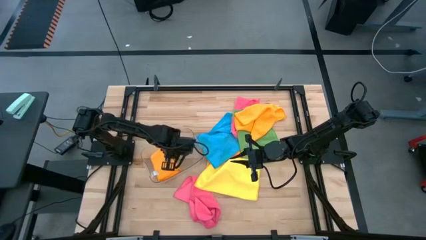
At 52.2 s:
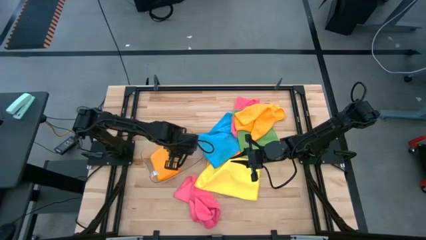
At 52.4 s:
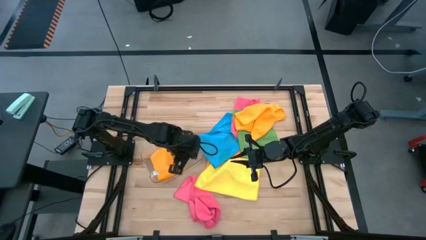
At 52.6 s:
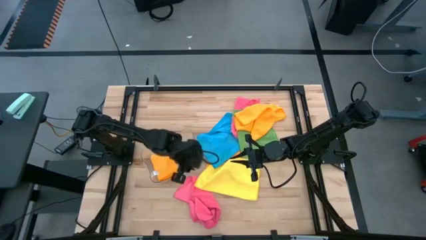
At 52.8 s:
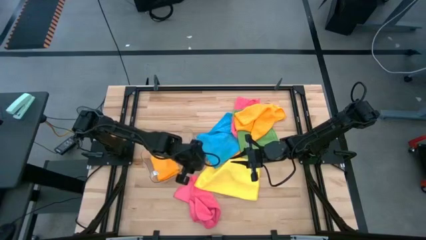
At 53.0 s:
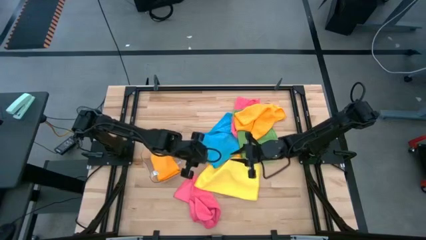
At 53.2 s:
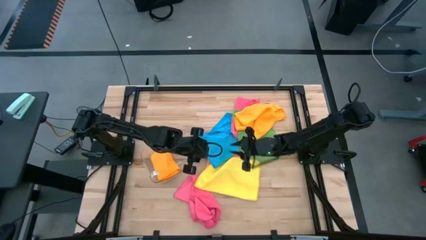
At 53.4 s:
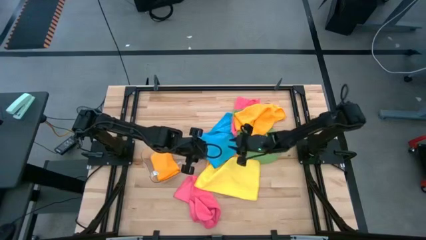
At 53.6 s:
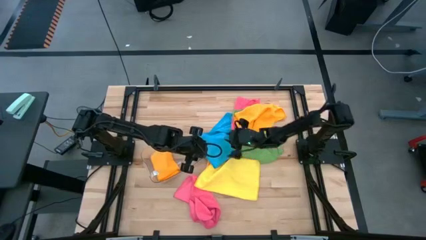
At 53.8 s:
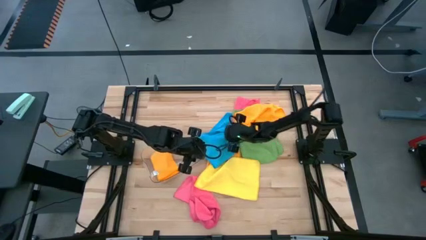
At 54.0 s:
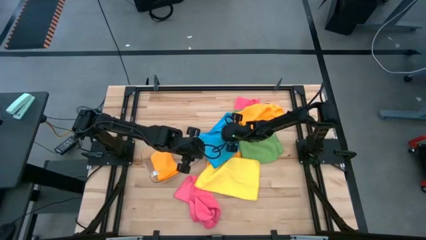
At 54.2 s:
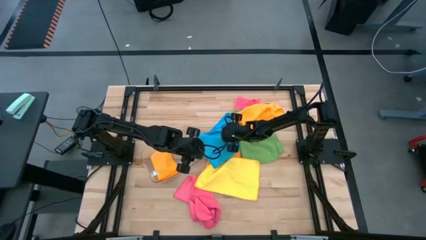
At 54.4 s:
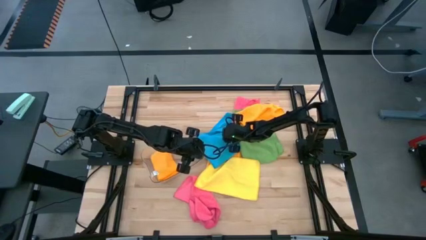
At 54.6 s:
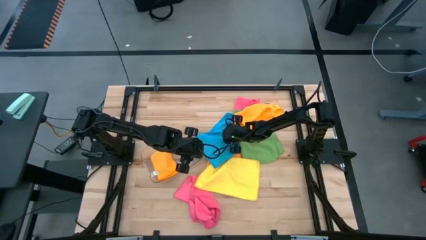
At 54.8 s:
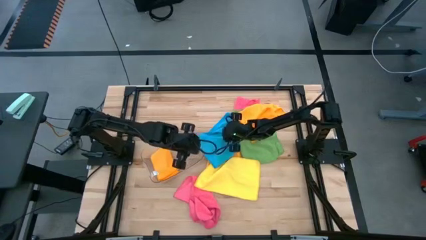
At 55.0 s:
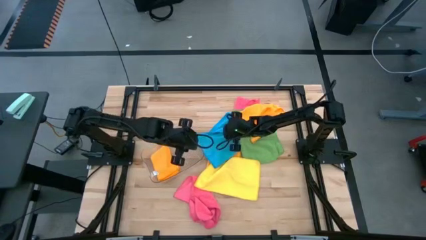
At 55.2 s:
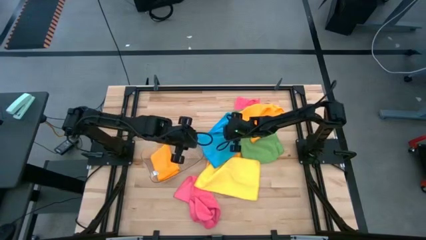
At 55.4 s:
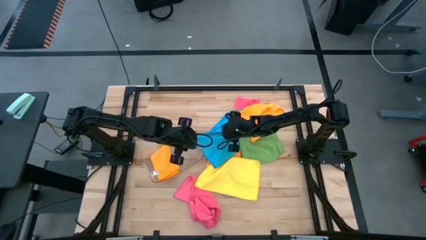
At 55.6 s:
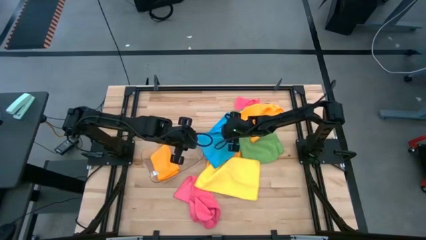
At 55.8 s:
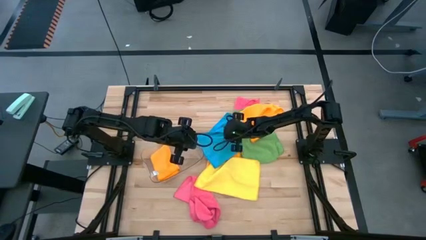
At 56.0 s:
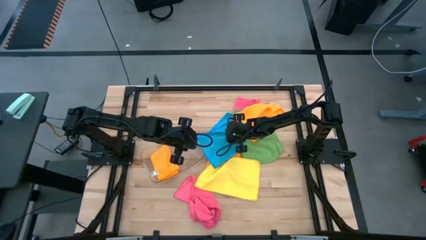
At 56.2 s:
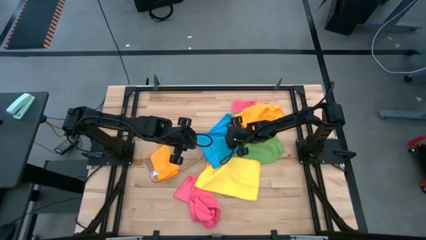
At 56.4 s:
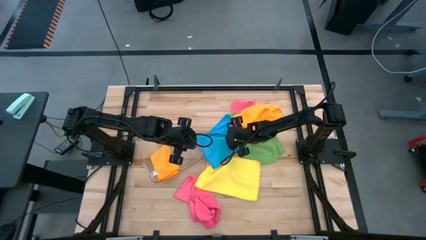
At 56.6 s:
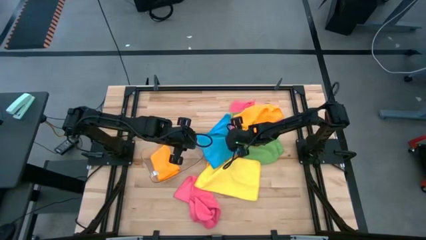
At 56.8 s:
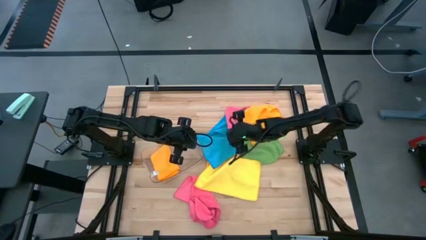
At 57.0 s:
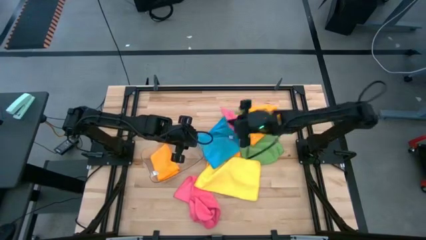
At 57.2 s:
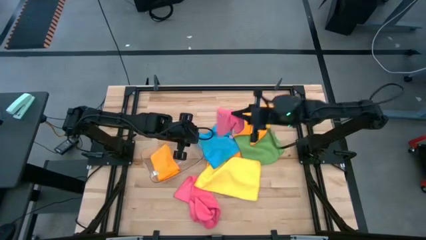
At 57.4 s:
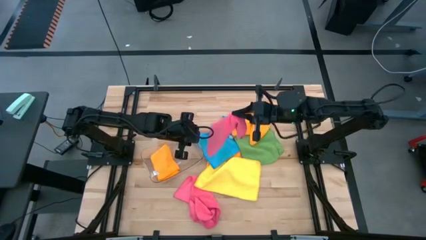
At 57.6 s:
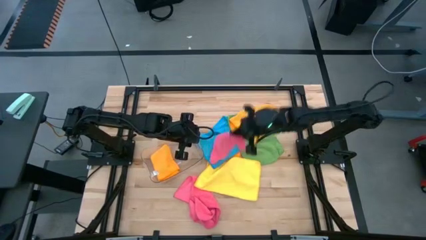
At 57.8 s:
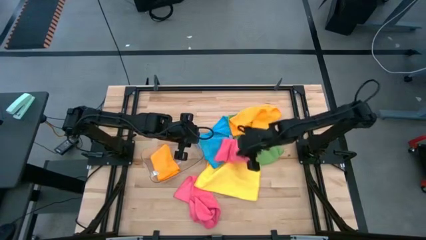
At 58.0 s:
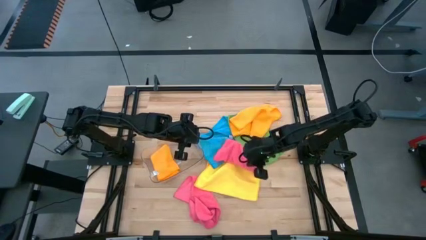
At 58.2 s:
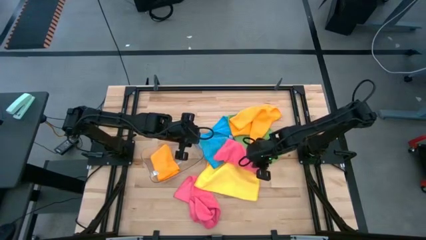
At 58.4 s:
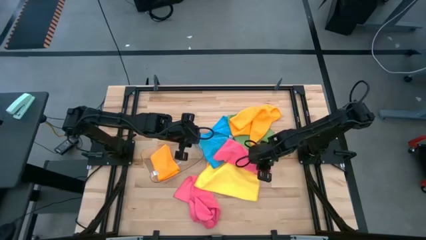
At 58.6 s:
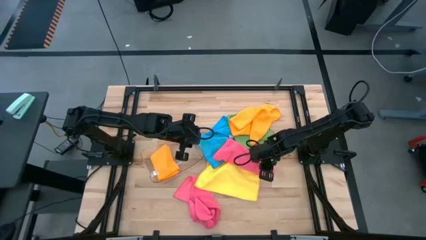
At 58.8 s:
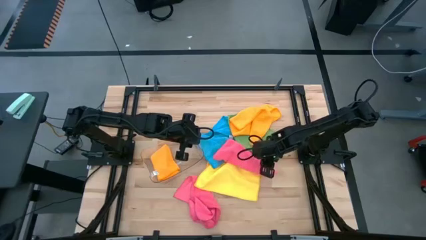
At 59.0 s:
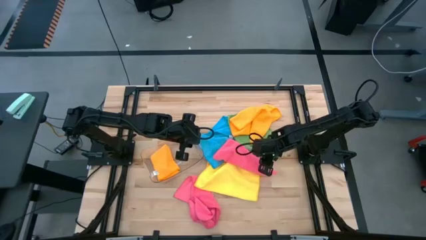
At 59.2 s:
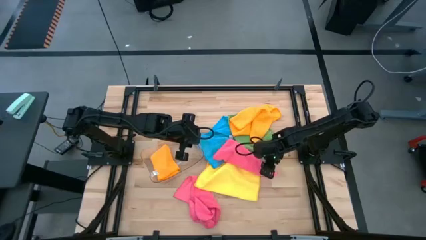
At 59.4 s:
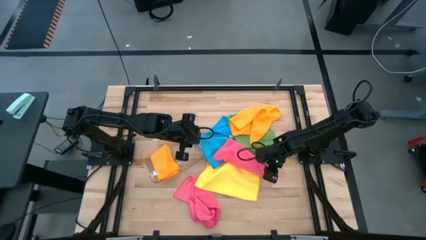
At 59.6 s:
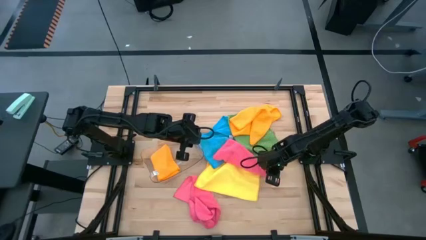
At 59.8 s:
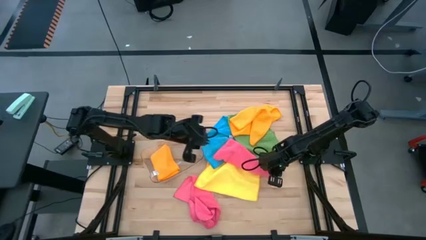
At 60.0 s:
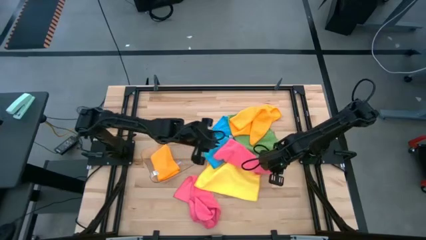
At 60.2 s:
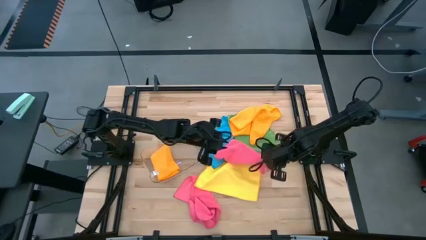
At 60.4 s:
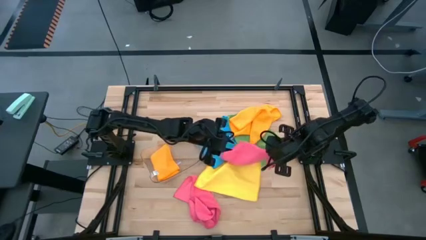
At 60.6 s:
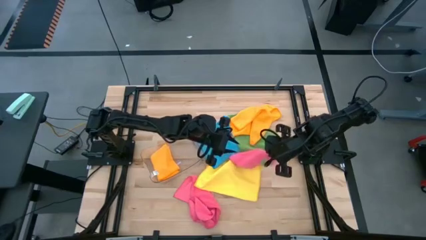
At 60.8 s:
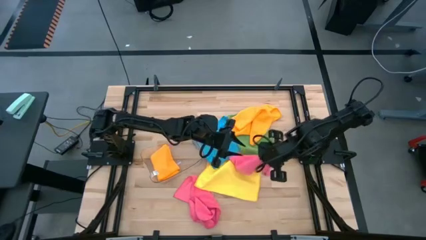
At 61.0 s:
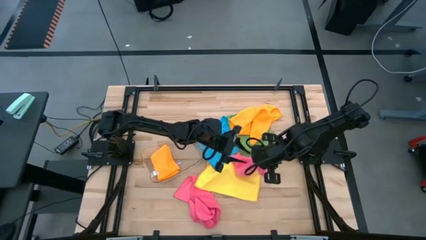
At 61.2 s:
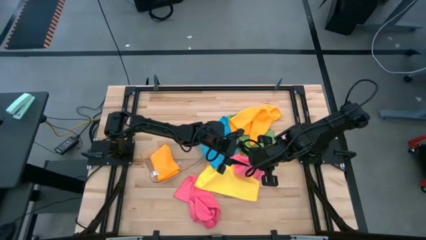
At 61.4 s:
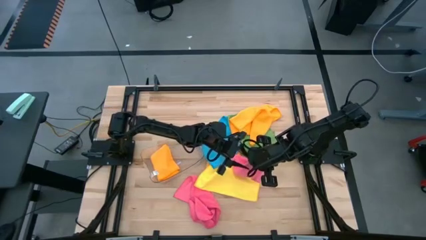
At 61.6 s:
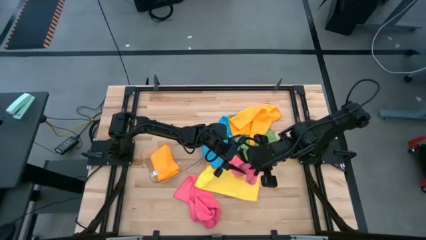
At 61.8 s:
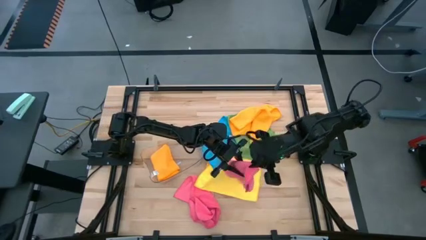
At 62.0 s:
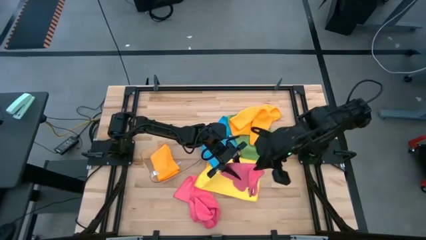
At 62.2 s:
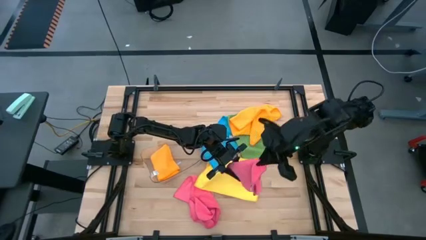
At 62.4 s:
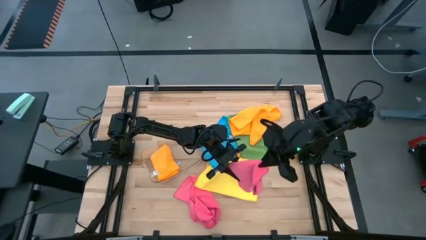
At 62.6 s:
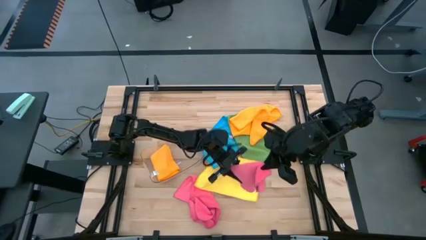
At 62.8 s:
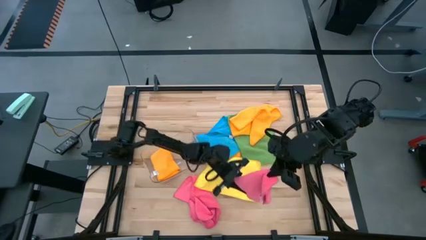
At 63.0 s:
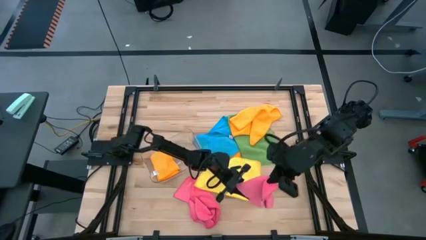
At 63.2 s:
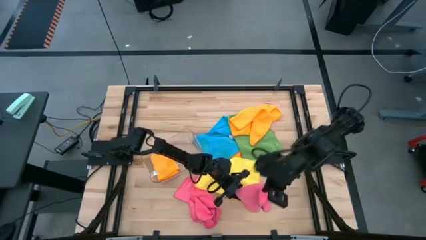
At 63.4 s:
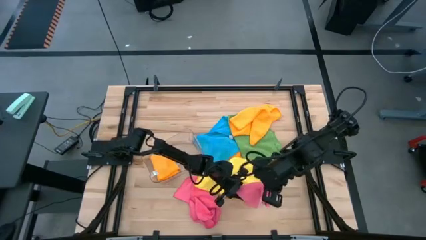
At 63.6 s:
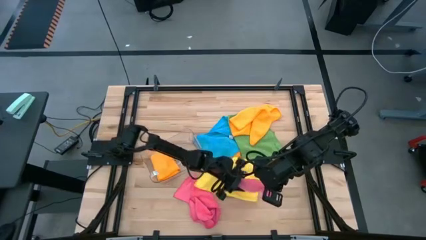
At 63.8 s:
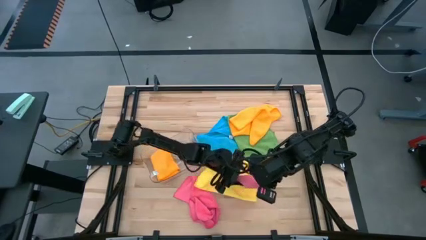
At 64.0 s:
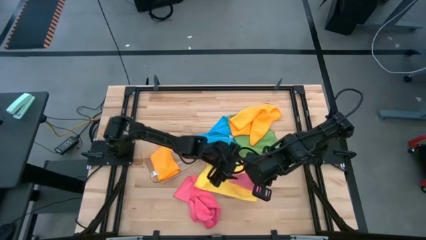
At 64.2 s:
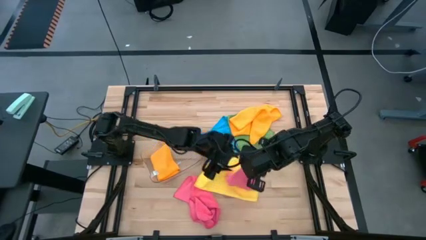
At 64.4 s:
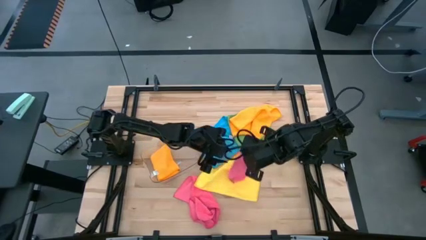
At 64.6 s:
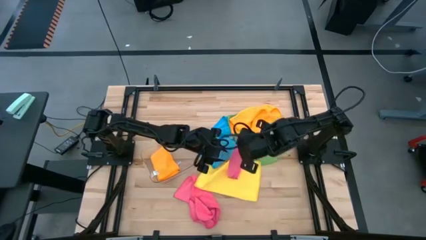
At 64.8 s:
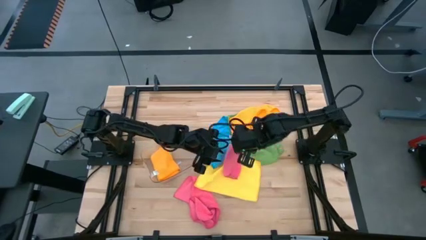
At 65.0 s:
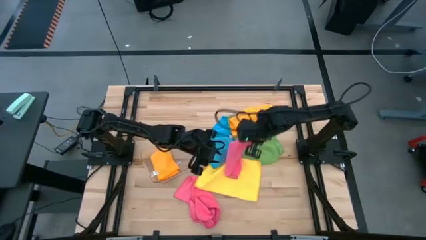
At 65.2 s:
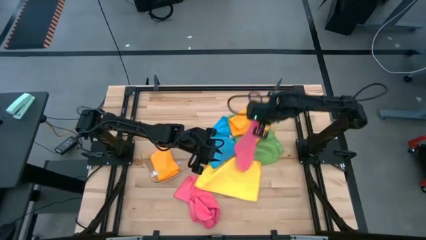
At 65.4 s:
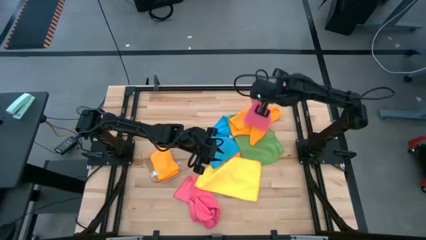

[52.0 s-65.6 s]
Task: Fold microfiber towels
Fold the top pink microfiber cloth
